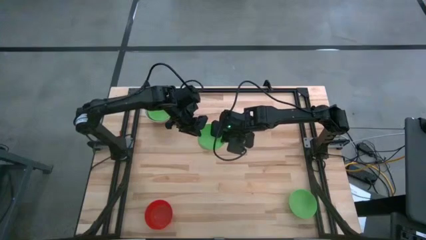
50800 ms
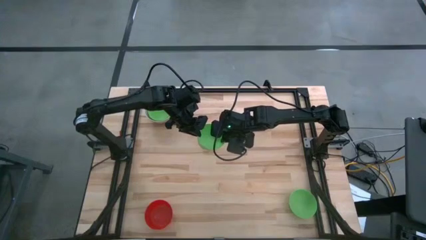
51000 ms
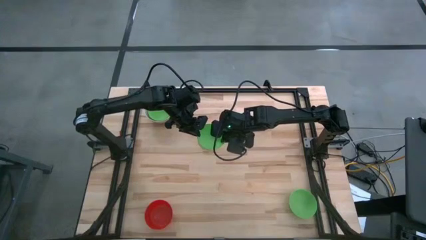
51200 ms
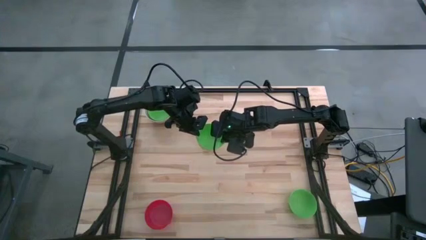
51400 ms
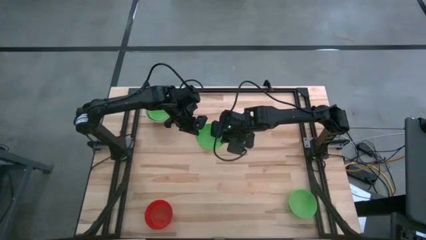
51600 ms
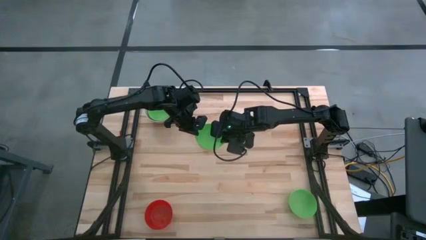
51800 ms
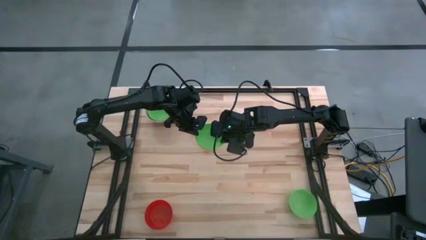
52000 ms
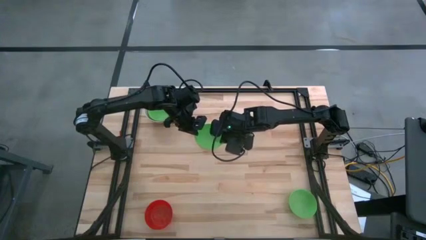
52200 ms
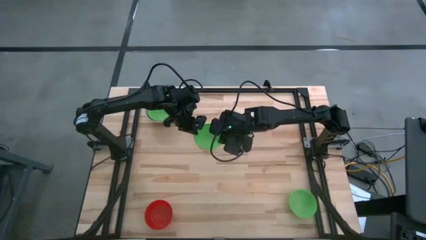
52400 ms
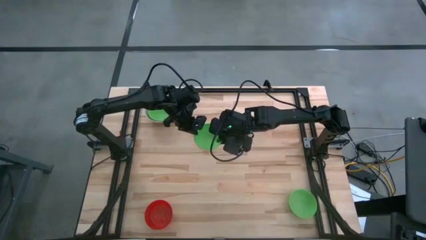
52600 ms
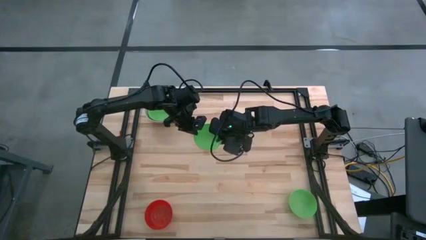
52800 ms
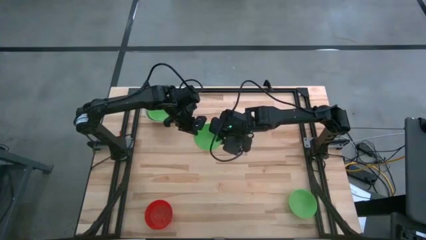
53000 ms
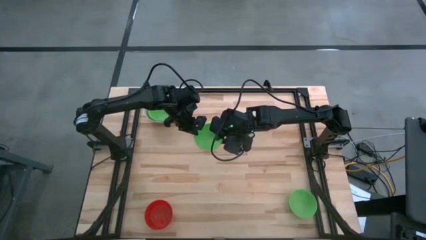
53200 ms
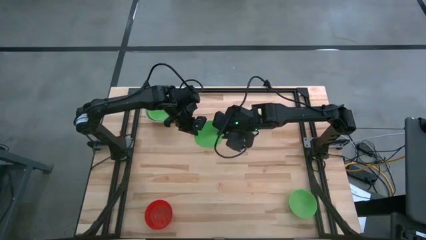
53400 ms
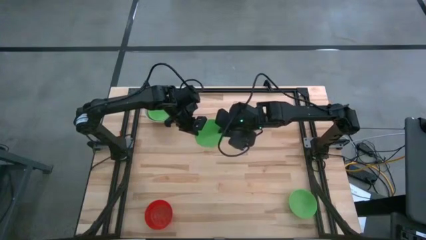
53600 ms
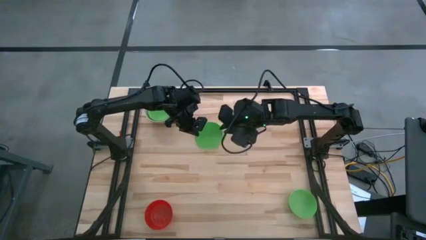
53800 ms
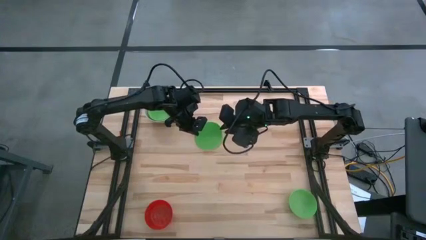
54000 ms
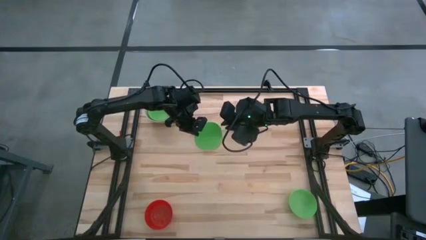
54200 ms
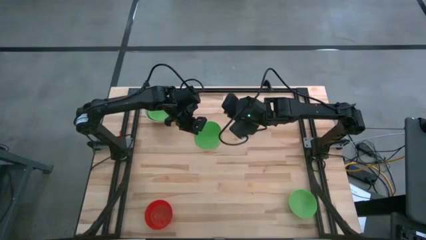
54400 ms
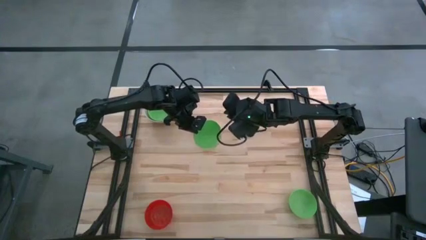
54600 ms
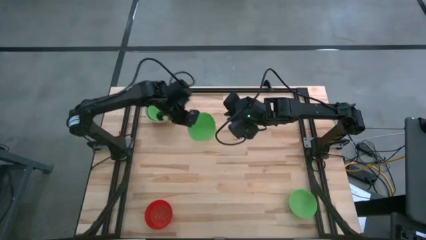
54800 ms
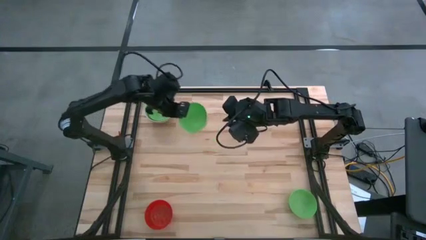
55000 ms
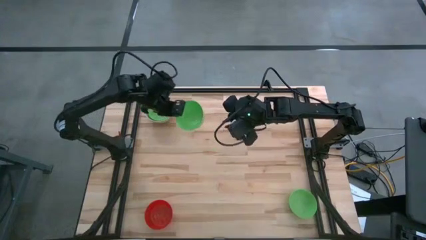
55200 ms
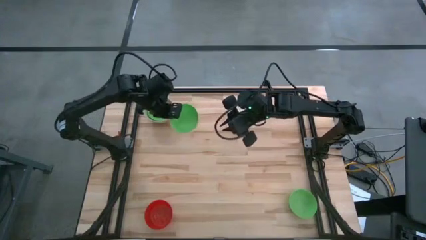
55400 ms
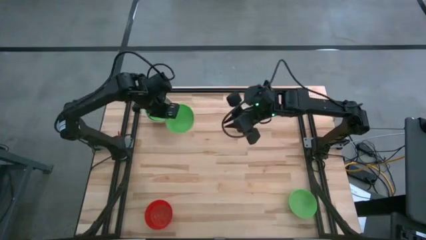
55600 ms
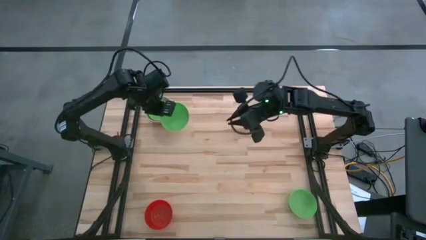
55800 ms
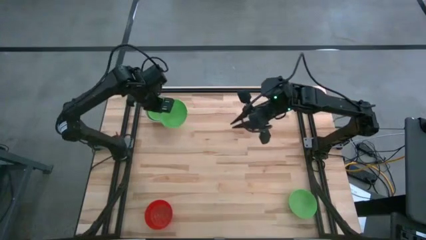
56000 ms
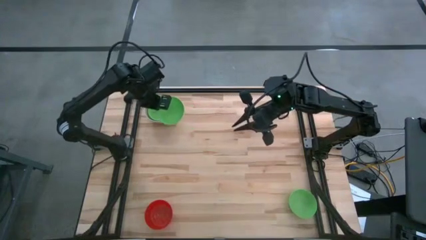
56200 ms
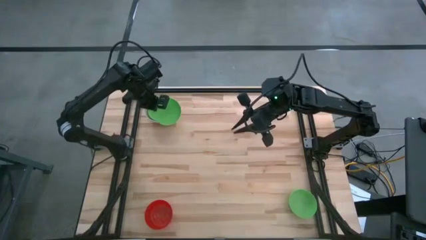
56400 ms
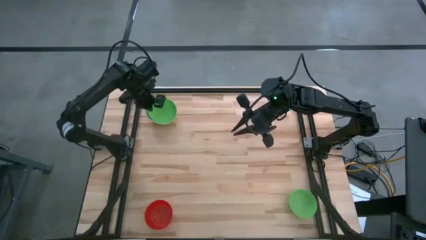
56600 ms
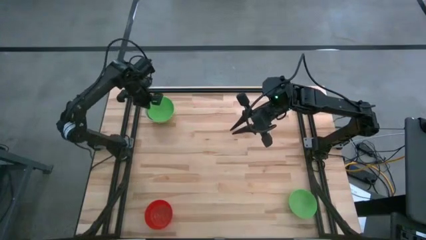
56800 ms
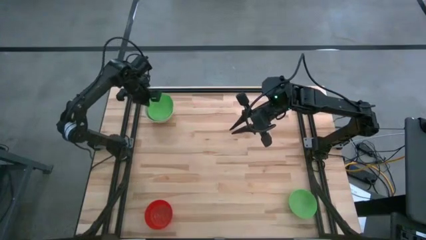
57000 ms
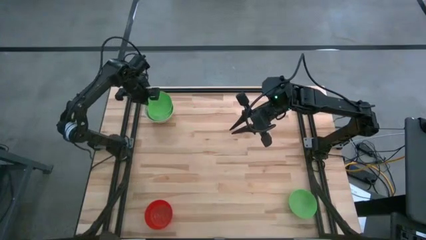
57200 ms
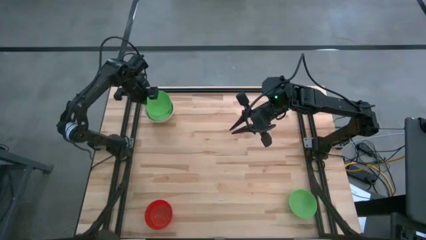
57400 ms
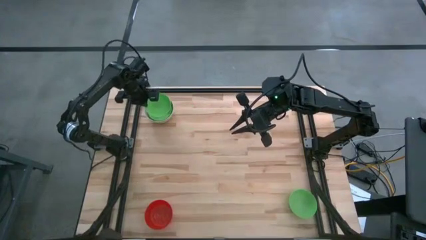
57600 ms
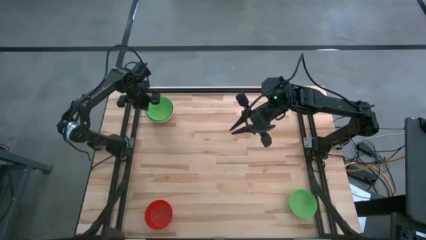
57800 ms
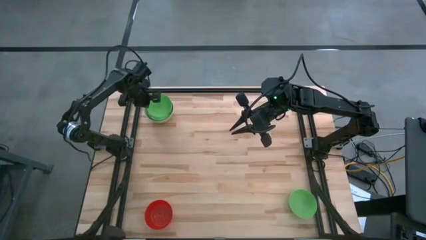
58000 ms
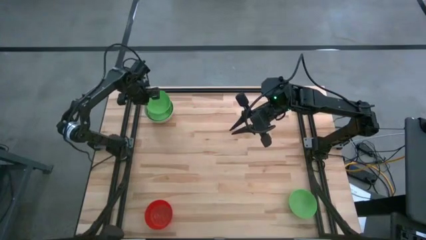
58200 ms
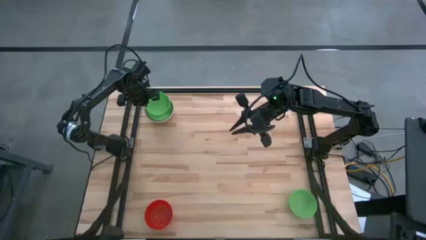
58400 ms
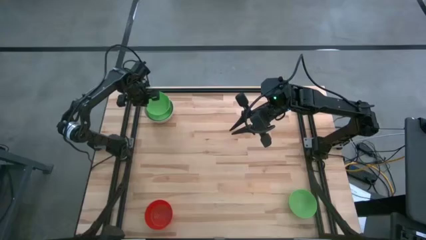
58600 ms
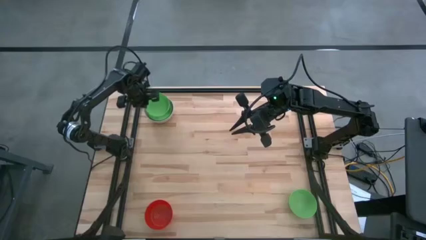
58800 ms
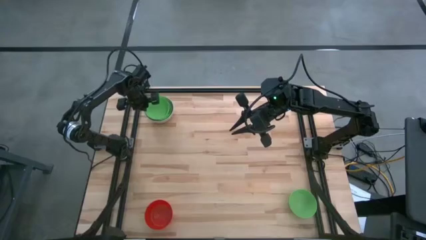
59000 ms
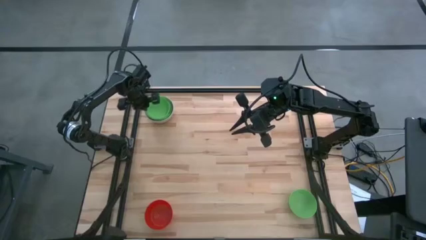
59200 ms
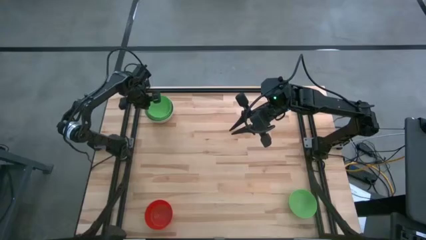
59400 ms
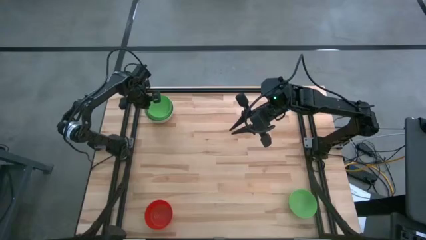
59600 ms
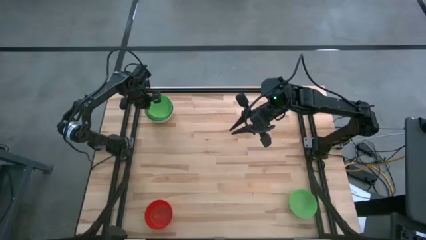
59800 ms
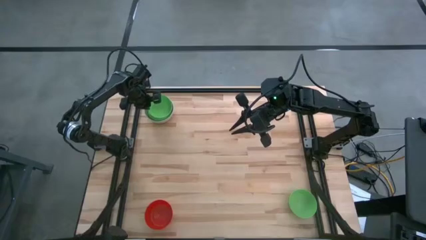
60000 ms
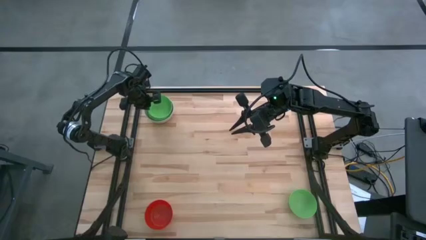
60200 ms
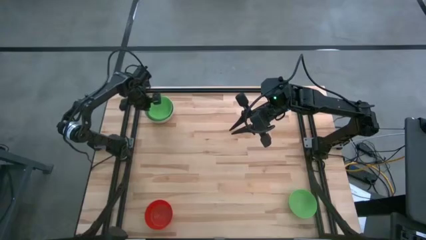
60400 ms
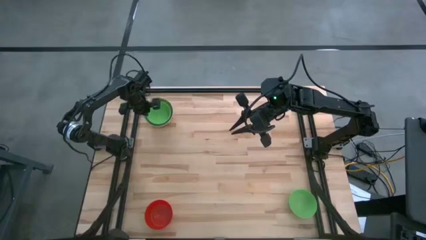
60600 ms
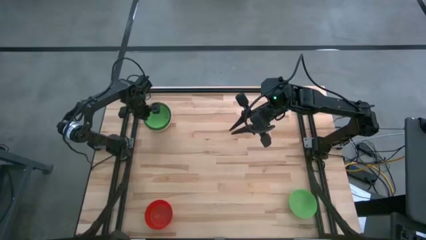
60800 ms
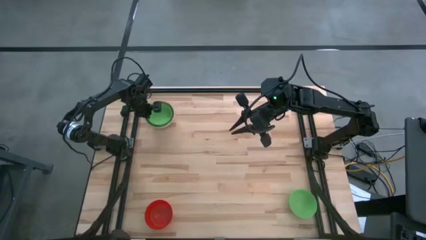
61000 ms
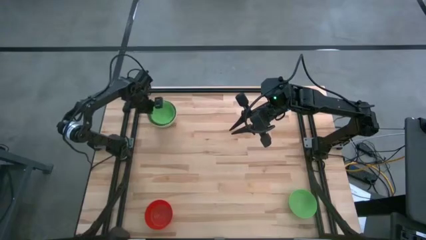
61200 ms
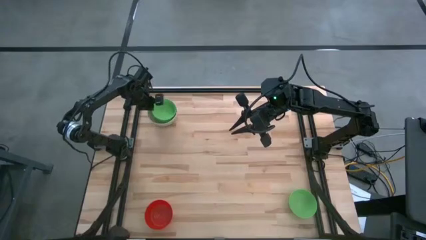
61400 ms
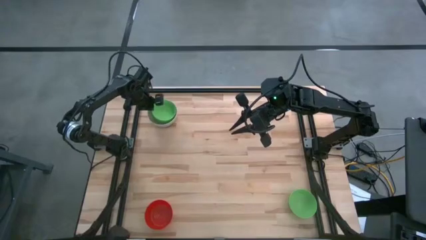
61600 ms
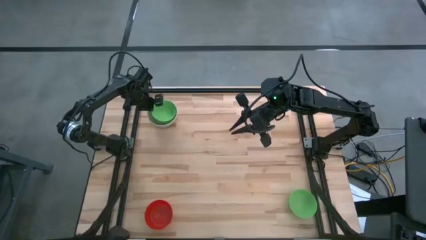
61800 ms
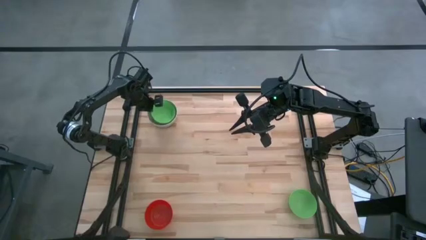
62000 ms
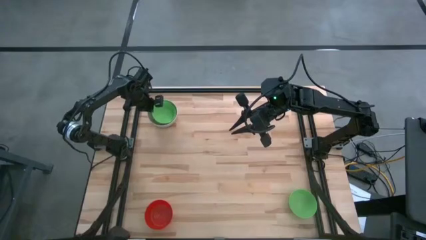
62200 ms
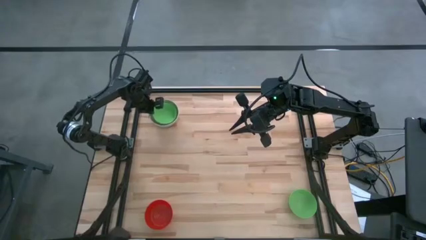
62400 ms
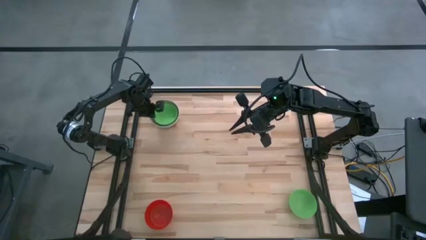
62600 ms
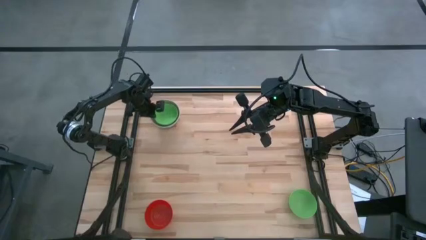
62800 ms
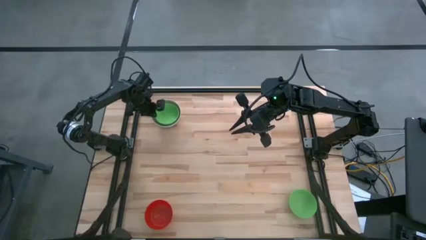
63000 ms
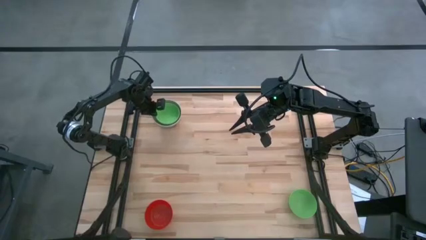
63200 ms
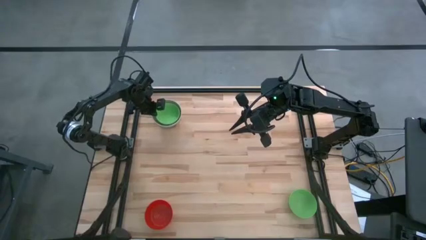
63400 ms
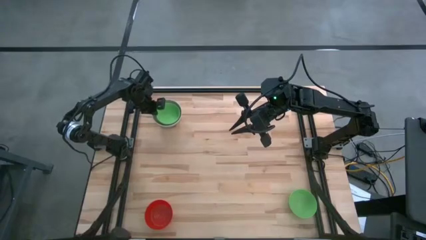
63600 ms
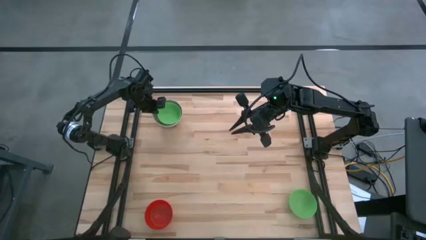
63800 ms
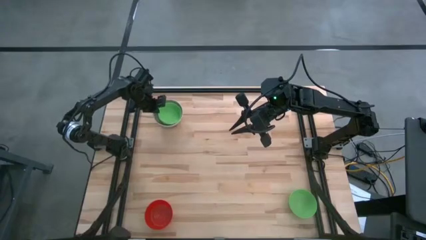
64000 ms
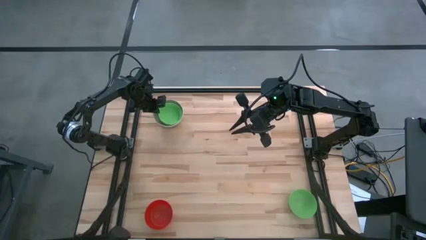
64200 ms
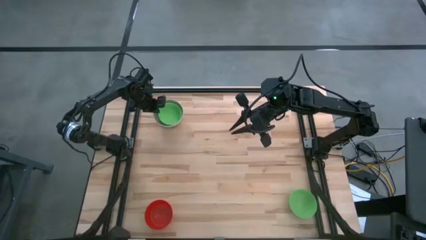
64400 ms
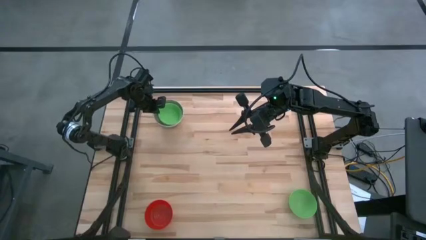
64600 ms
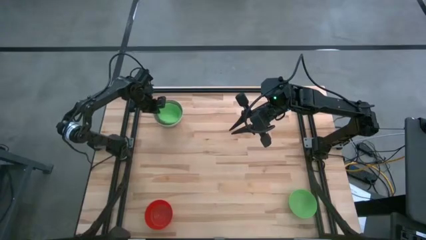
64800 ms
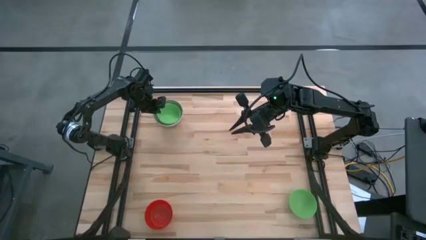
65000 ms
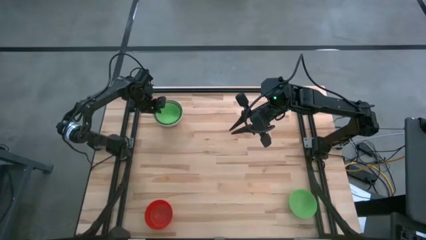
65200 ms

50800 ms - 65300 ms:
Stack the top green bowl on the stacked green bowl
